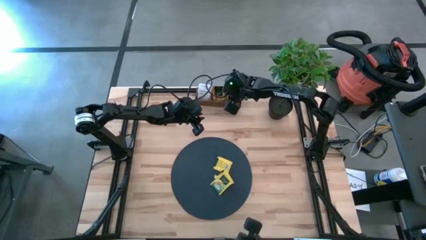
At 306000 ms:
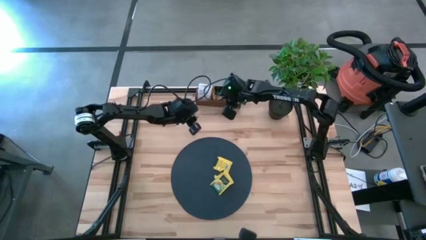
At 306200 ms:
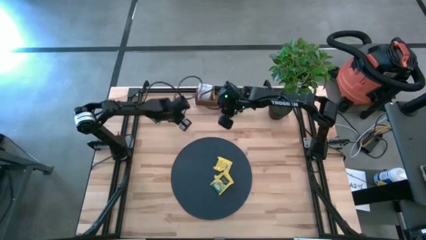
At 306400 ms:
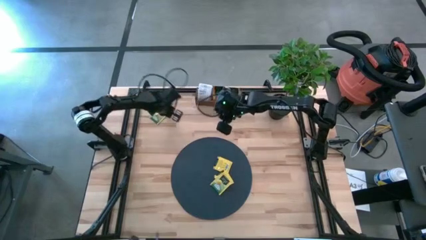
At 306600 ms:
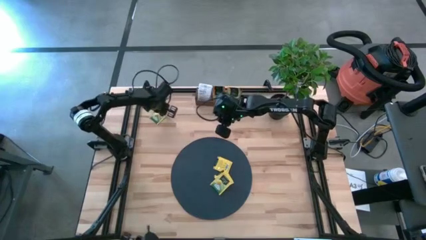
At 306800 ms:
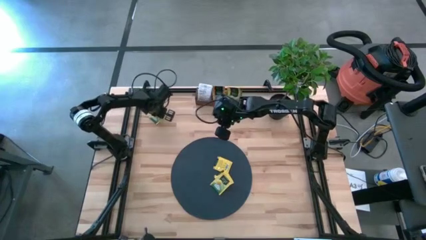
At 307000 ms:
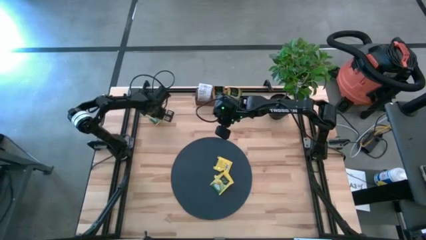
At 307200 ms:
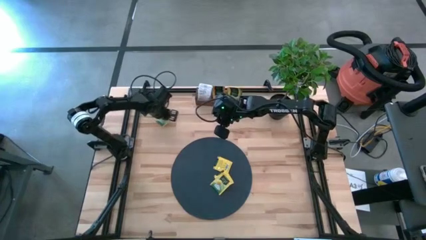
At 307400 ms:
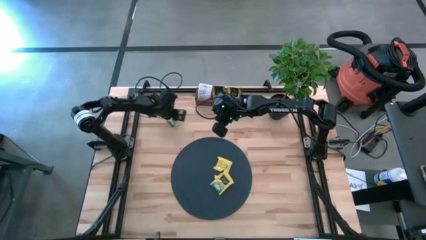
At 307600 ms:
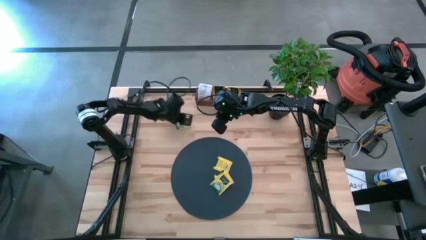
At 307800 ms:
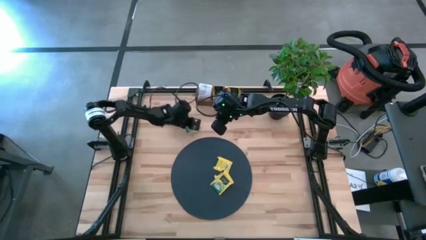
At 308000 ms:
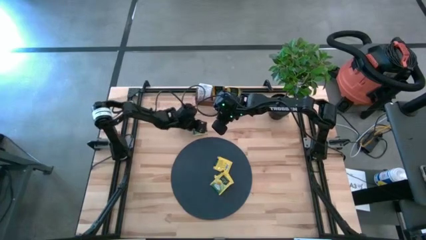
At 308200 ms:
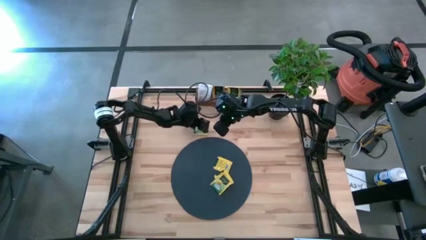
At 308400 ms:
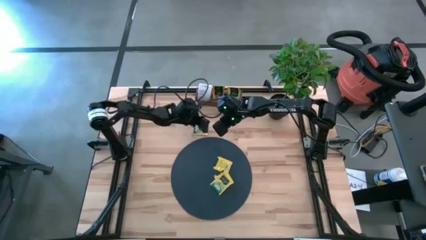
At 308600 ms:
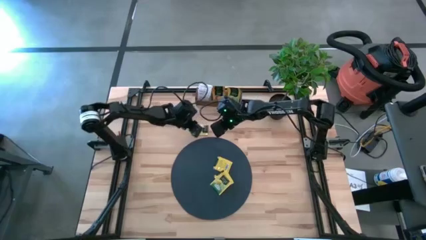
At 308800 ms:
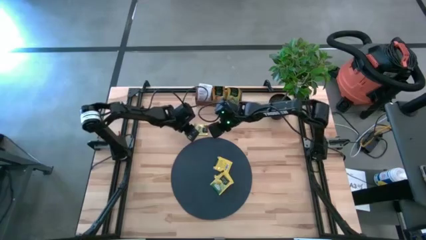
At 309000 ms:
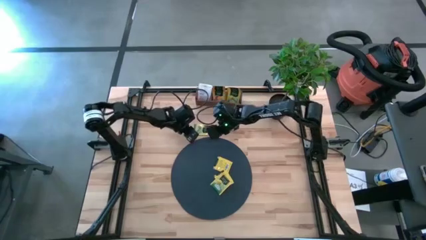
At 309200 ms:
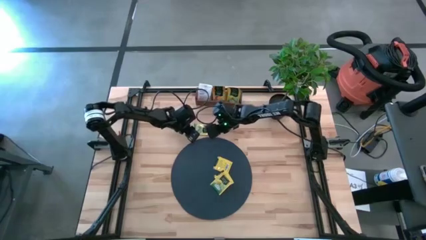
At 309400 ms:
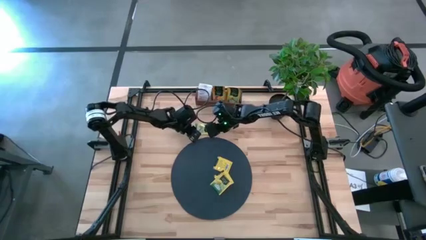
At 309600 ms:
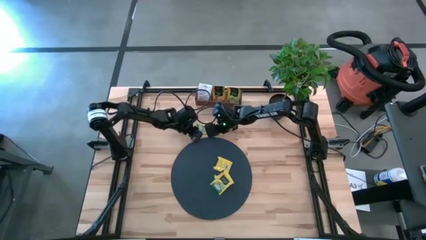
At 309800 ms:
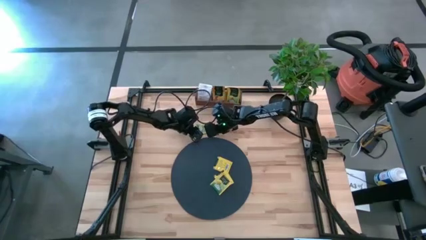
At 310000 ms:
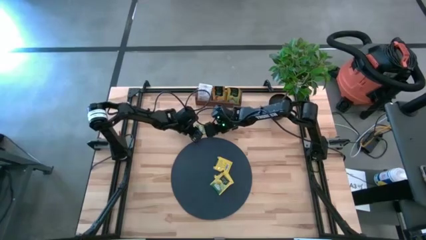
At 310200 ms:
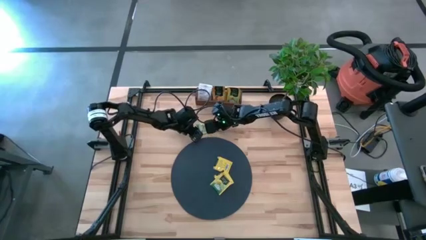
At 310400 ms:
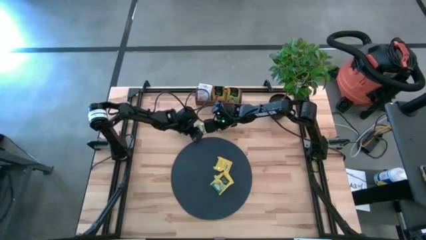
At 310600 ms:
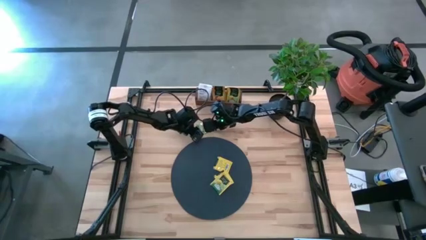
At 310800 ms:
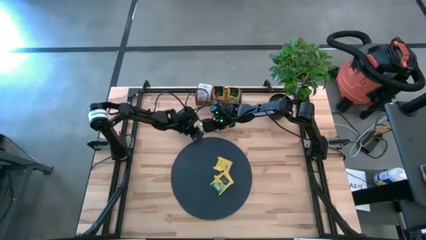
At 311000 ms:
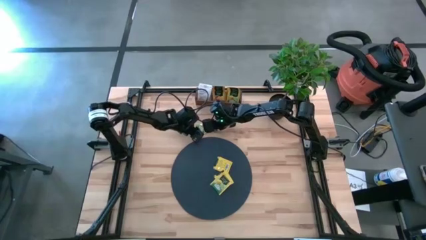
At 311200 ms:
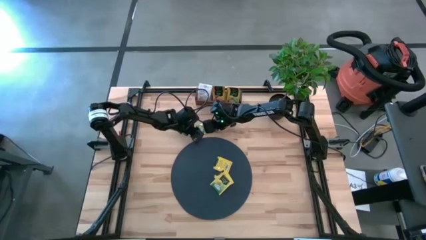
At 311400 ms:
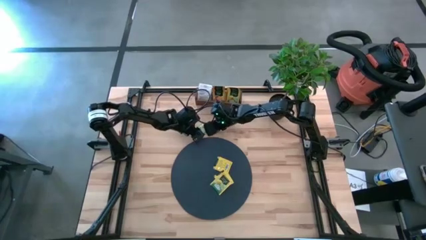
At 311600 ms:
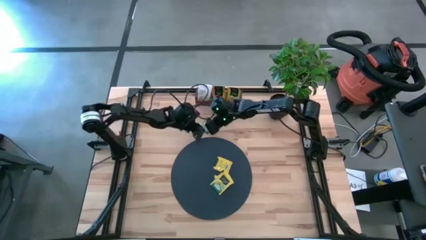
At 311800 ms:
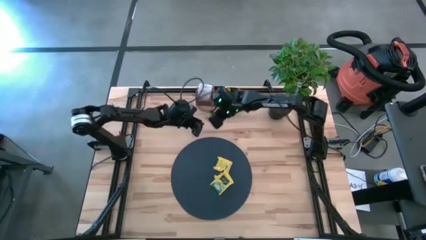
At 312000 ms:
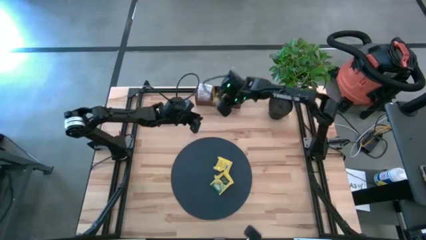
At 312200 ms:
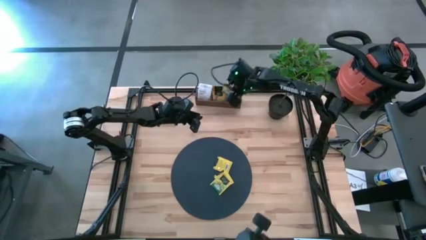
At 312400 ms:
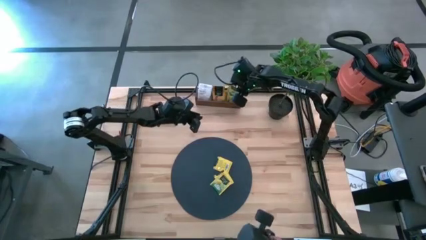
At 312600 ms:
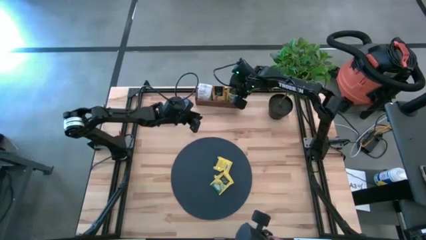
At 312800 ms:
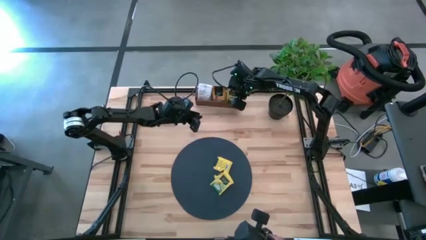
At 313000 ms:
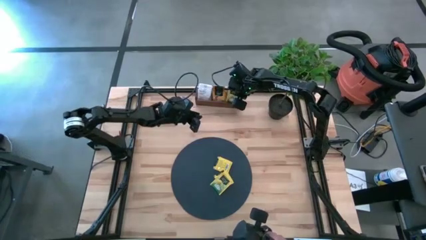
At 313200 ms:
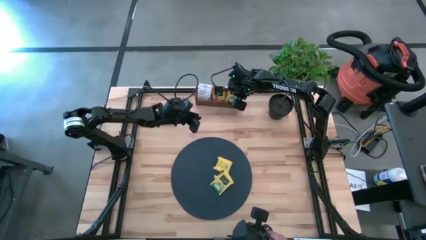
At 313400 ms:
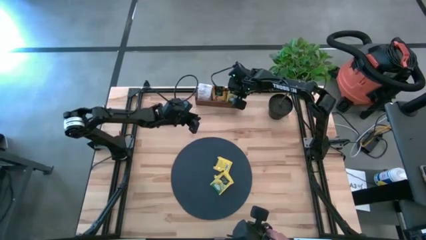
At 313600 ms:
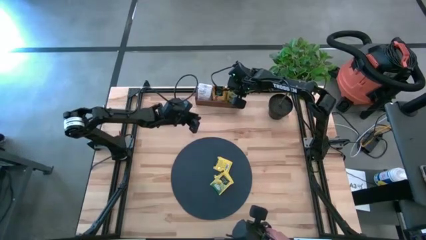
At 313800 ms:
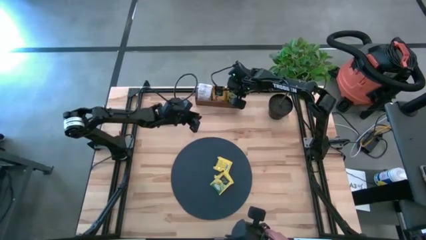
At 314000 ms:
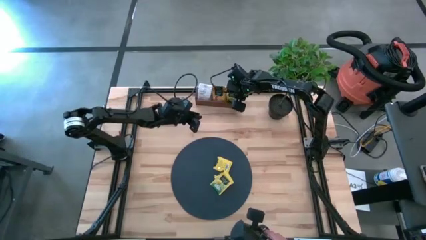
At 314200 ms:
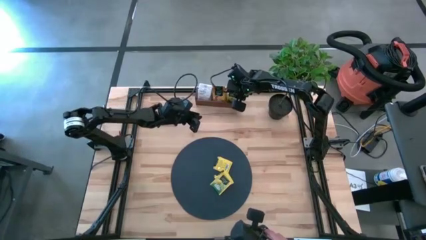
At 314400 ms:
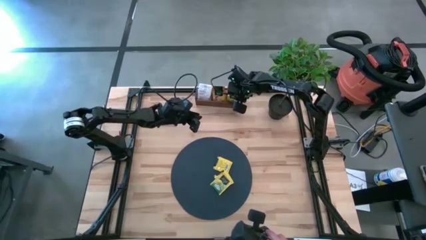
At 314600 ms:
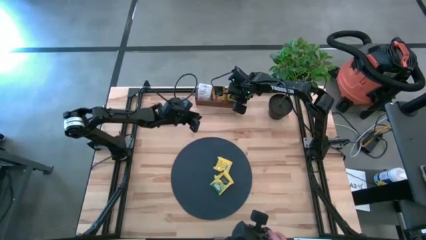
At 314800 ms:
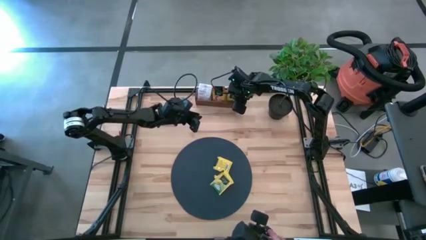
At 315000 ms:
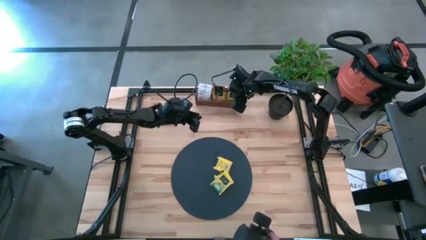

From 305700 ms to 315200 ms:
Task: Pick & Place Tea
Put the green tea bag into the right section of the wooden organizer

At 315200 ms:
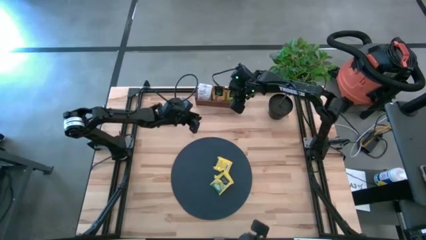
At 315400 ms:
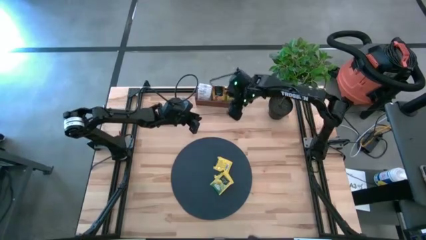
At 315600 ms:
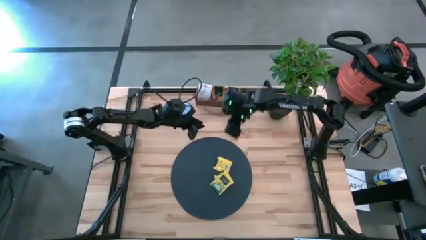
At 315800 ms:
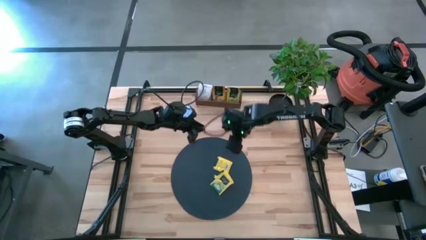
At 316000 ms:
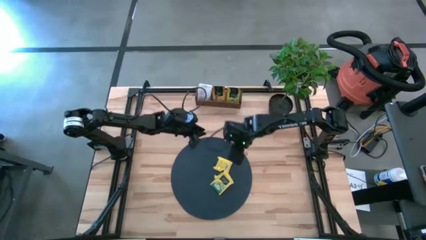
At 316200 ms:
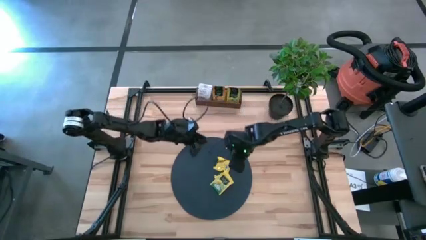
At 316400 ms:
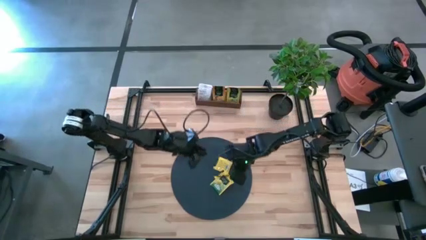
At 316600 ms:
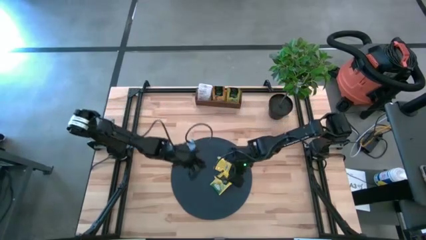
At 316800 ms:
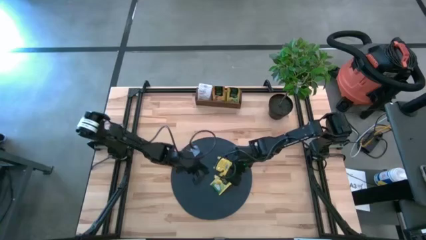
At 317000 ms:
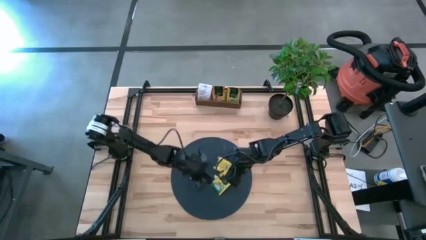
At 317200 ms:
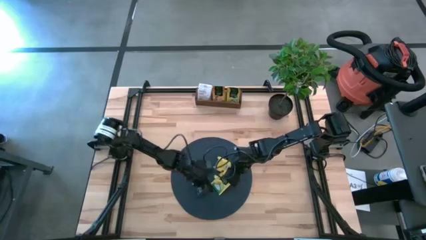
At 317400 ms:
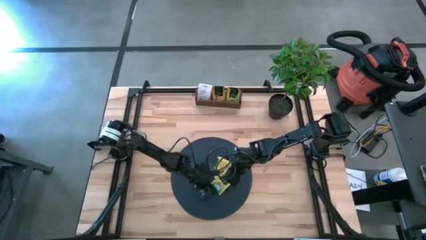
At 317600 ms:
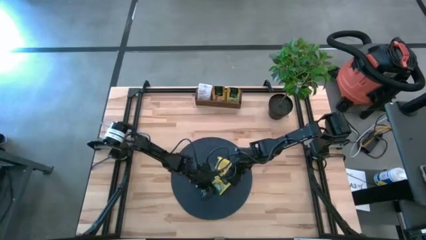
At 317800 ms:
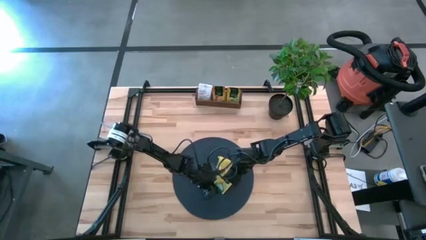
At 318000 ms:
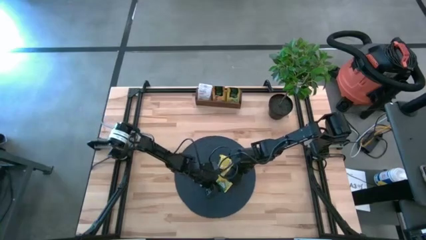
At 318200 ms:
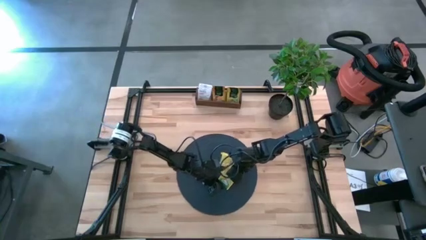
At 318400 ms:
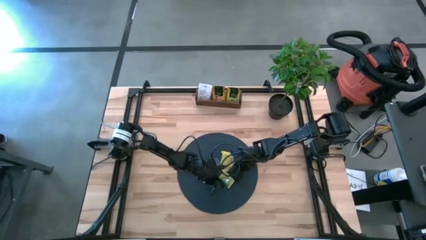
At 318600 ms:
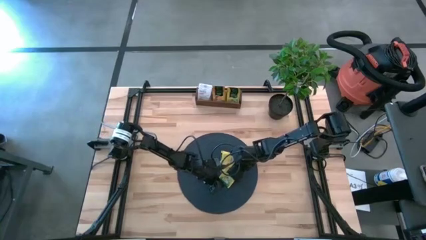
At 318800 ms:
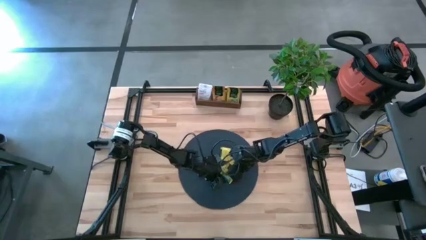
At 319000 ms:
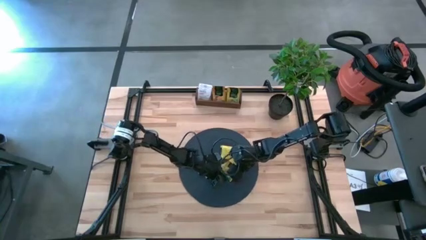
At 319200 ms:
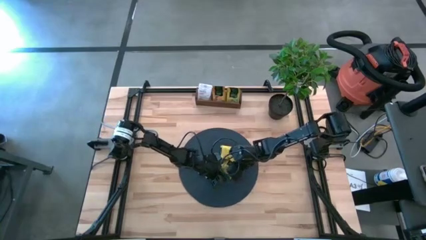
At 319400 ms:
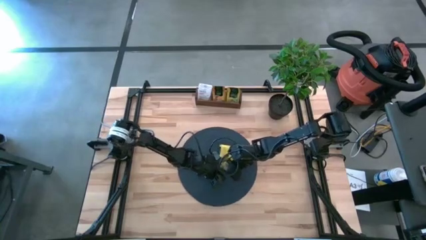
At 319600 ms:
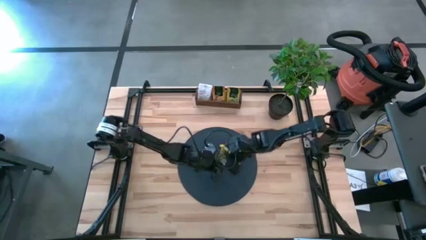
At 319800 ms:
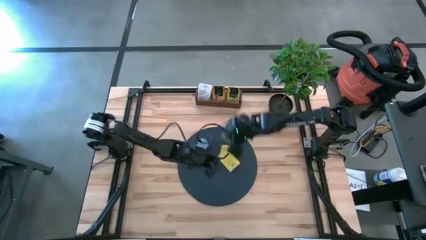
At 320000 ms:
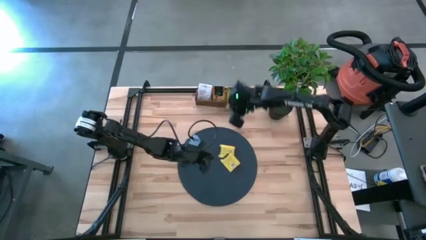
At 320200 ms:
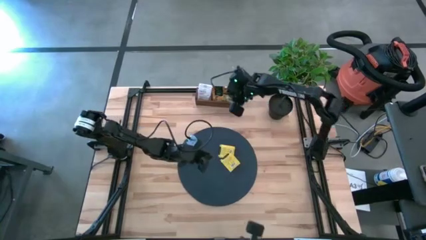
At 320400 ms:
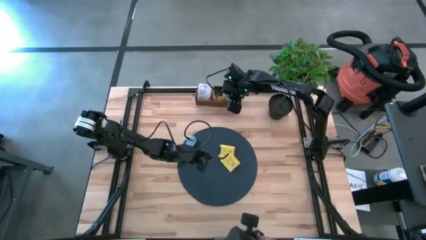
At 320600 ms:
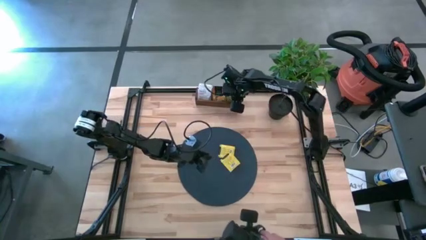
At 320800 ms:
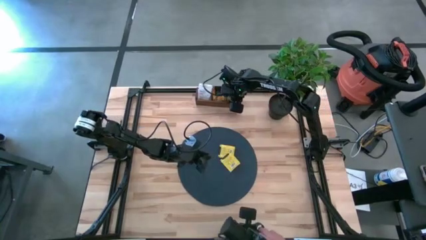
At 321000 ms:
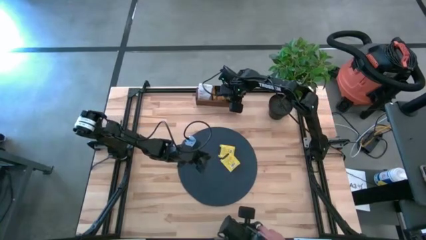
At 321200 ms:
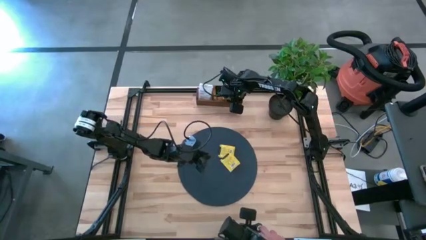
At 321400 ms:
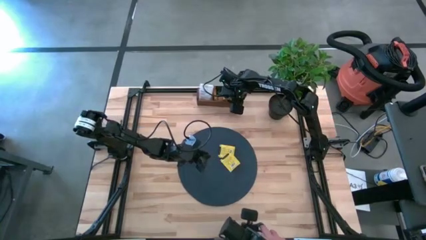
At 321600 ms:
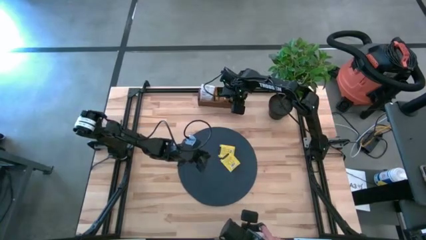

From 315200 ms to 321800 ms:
Put the green tea bag into the right section of the wooden organizer

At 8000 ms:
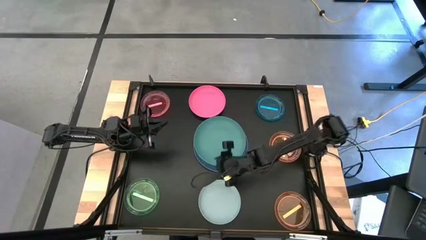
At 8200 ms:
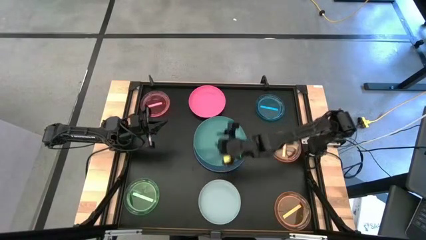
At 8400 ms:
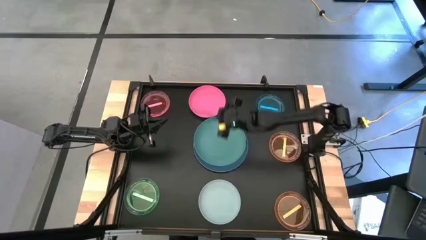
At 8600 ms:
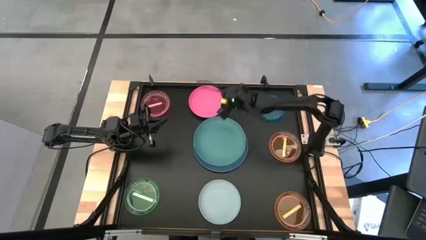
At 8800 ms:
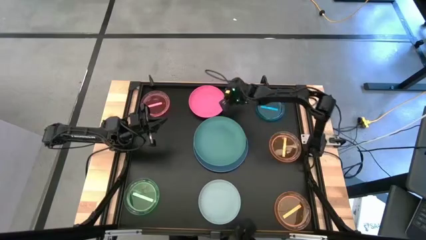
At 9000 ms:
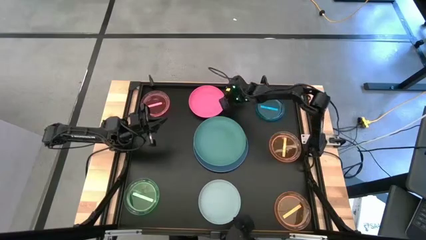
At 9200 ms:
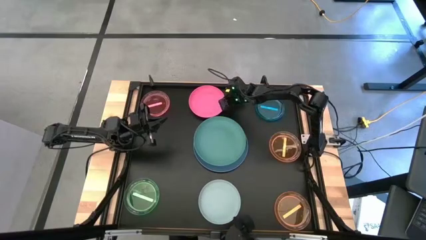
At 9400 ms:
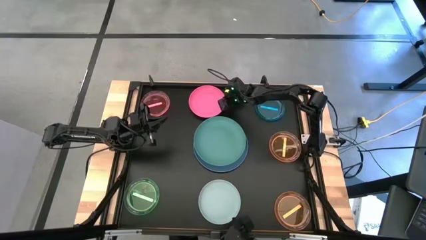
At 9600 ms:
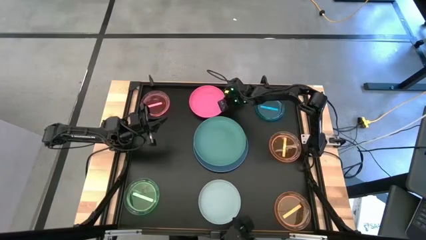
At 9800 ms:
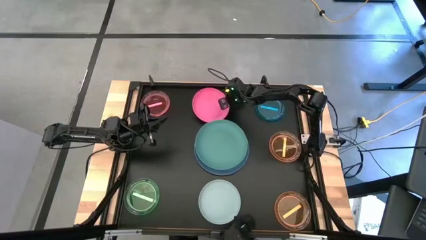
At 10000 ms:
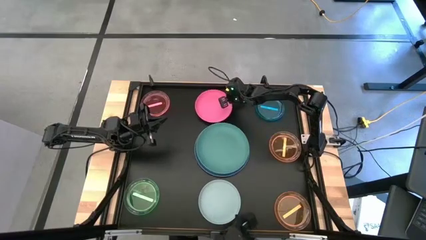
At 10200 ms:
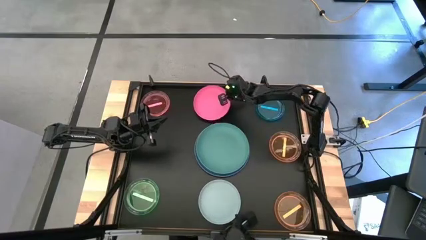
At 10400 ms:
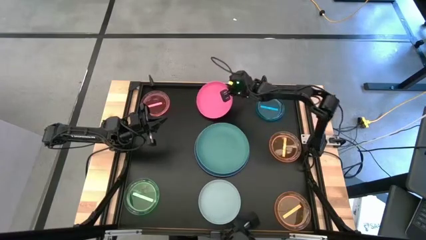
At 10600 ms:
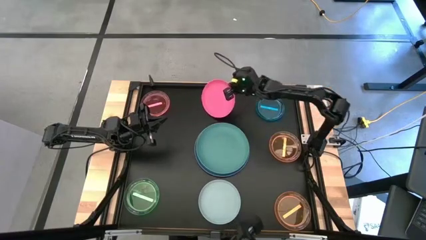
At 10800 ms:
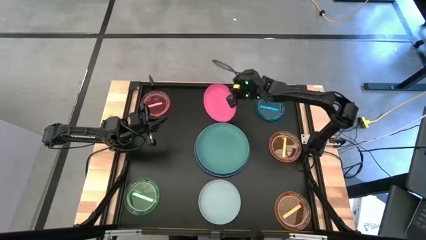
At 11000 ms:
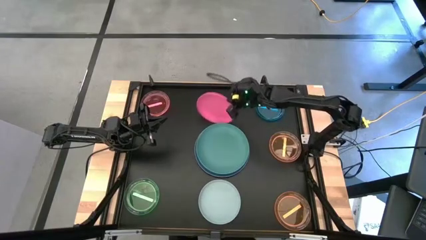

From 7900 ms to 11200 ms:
Task: Stack plastic plates
Stack the right pink plate on top of the green plate
